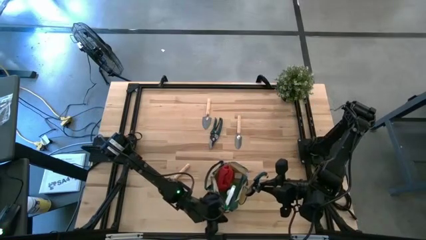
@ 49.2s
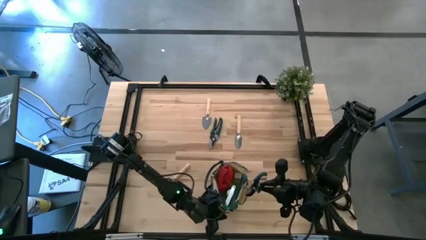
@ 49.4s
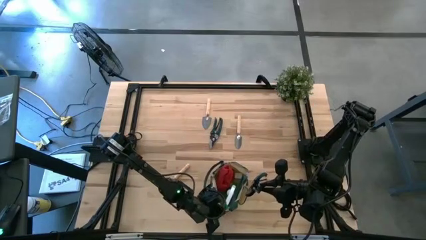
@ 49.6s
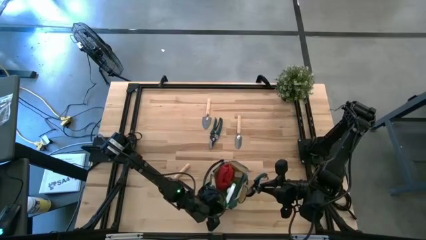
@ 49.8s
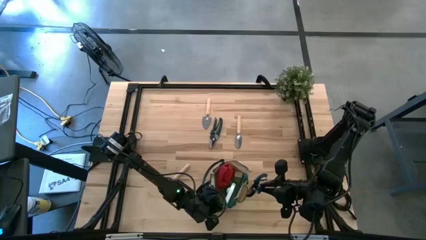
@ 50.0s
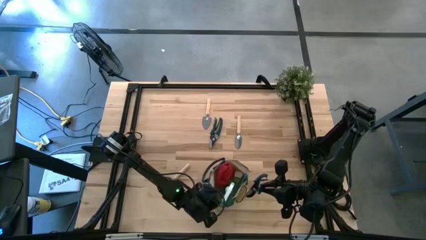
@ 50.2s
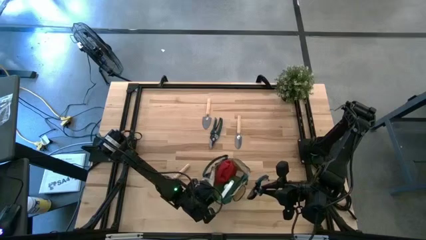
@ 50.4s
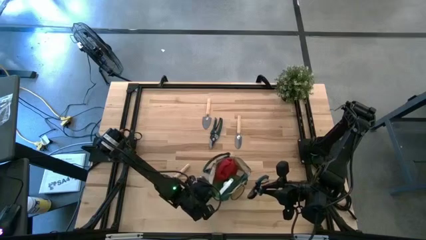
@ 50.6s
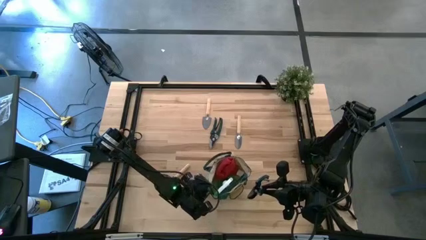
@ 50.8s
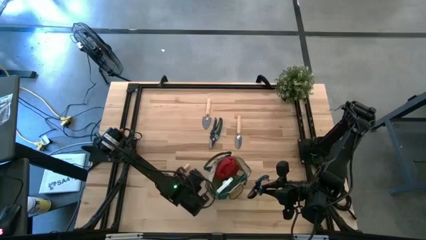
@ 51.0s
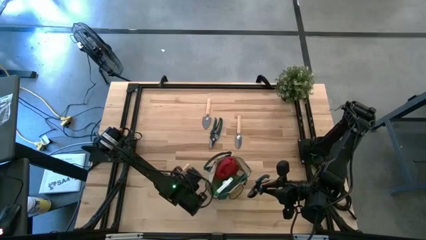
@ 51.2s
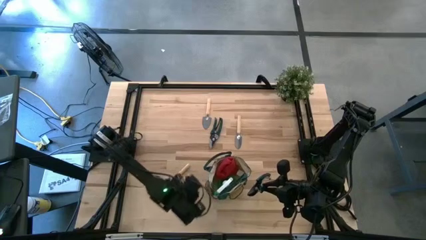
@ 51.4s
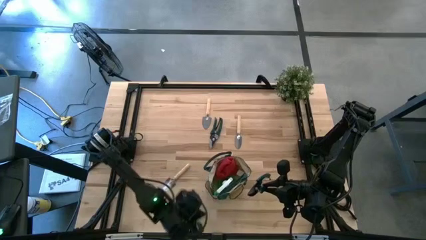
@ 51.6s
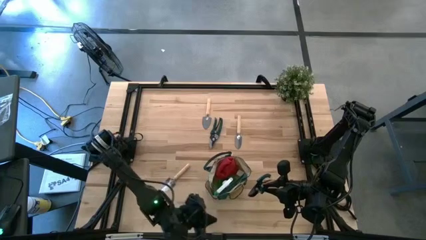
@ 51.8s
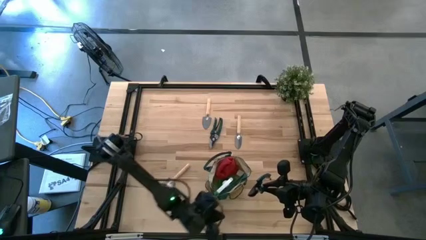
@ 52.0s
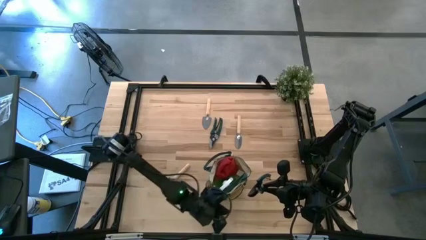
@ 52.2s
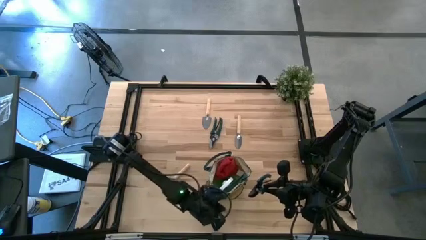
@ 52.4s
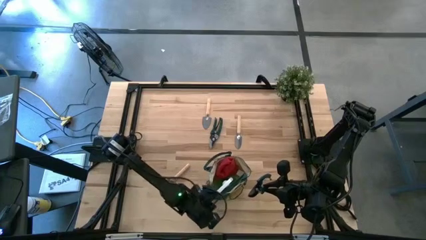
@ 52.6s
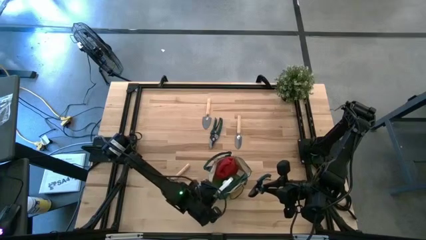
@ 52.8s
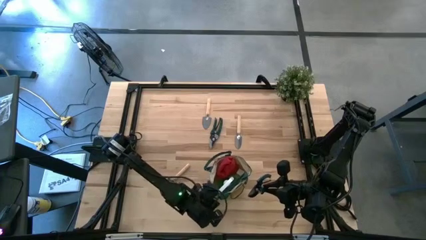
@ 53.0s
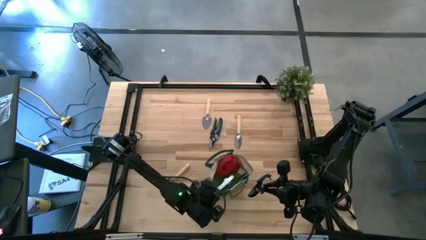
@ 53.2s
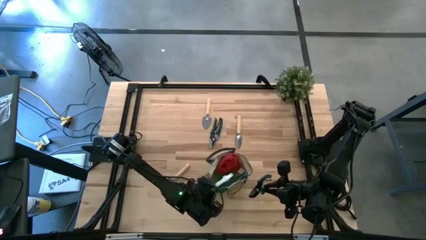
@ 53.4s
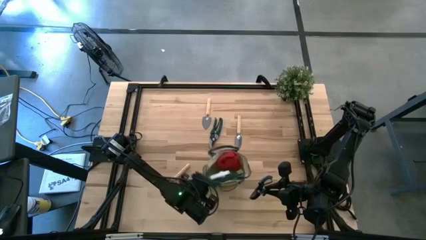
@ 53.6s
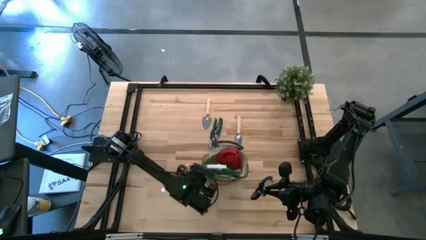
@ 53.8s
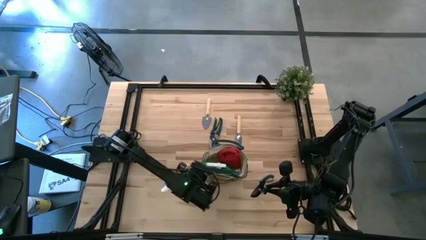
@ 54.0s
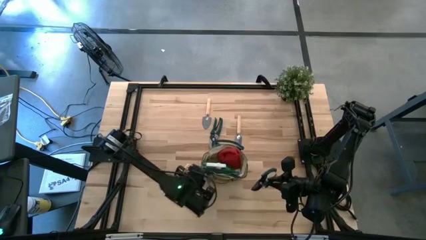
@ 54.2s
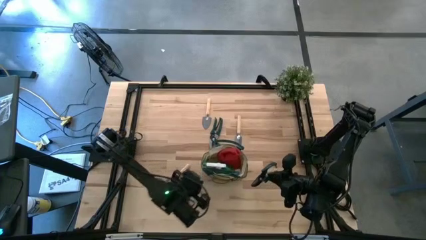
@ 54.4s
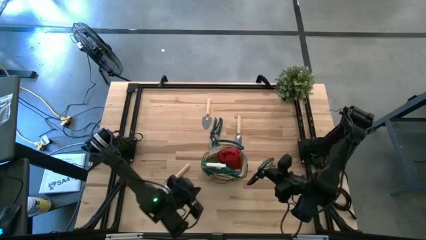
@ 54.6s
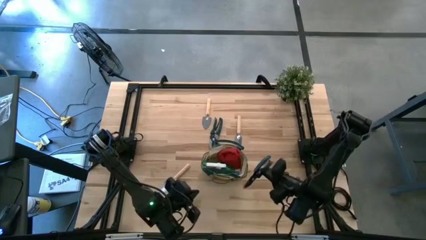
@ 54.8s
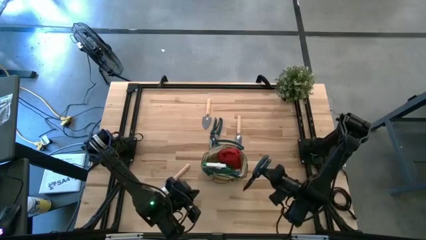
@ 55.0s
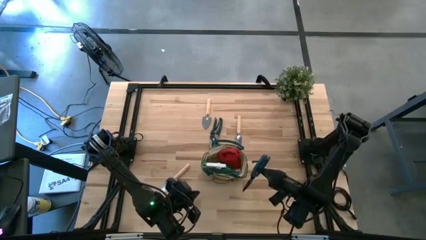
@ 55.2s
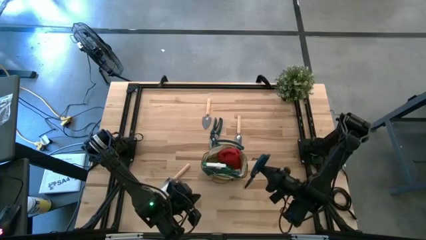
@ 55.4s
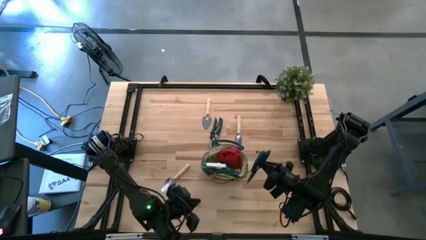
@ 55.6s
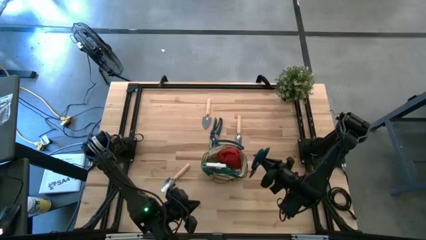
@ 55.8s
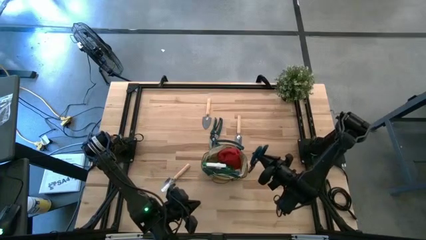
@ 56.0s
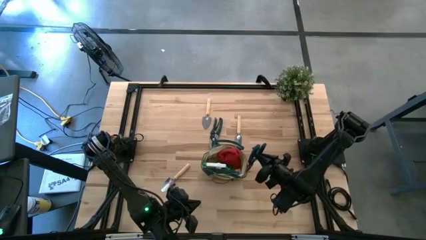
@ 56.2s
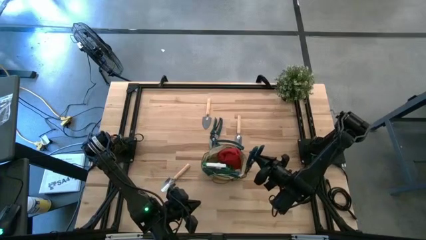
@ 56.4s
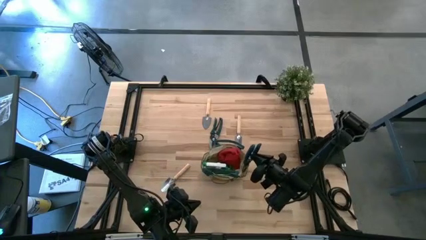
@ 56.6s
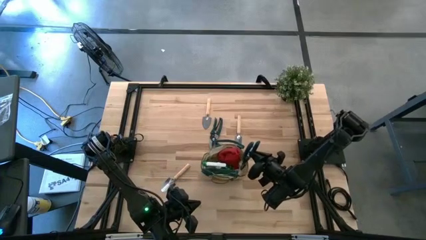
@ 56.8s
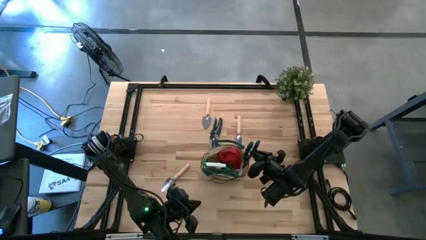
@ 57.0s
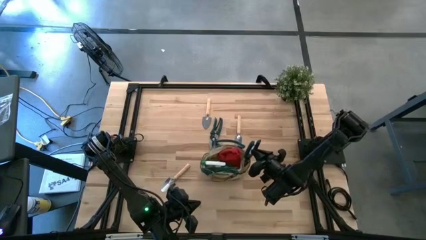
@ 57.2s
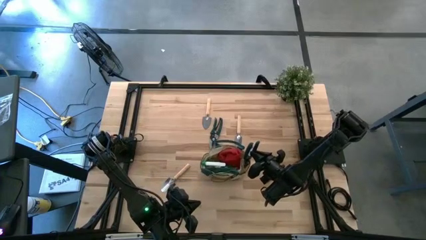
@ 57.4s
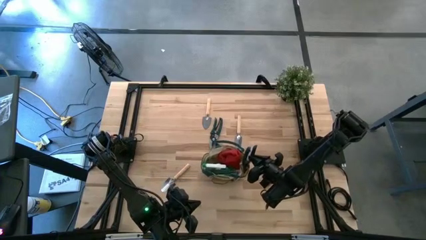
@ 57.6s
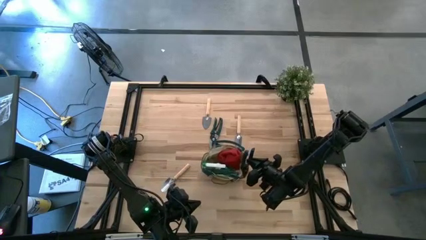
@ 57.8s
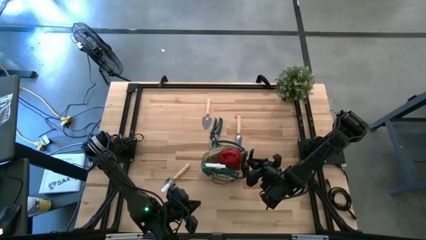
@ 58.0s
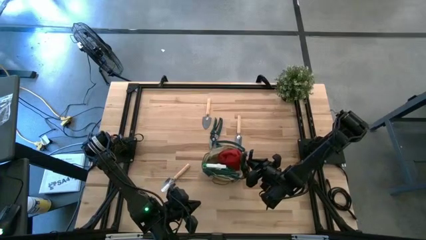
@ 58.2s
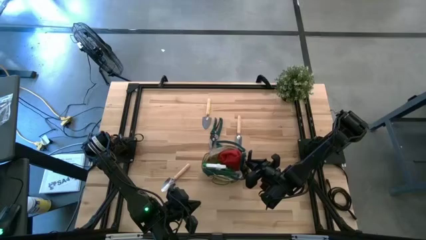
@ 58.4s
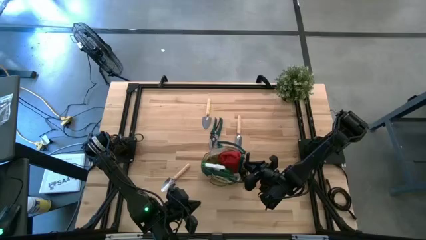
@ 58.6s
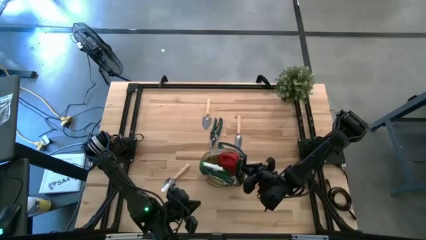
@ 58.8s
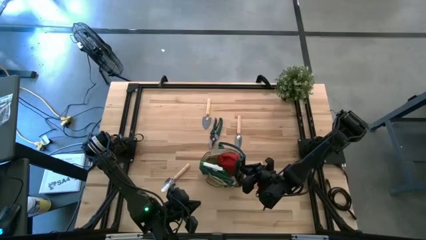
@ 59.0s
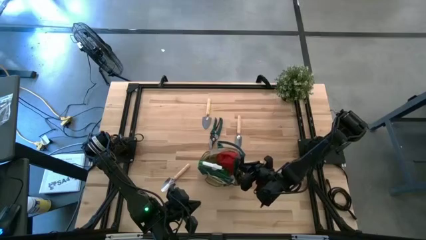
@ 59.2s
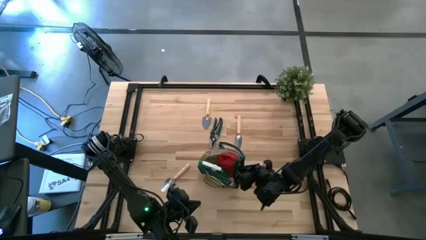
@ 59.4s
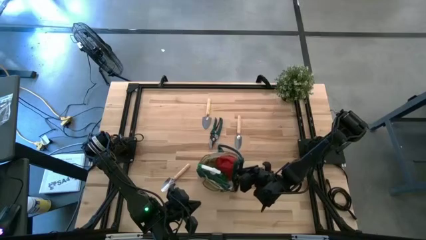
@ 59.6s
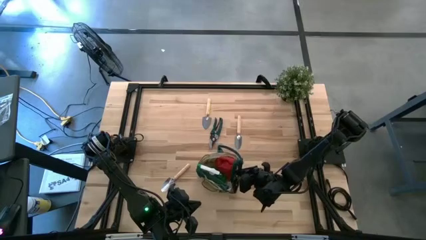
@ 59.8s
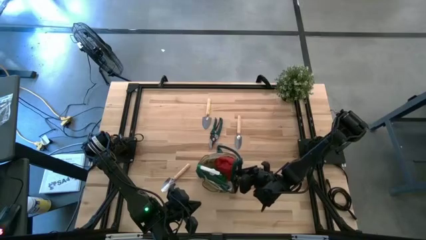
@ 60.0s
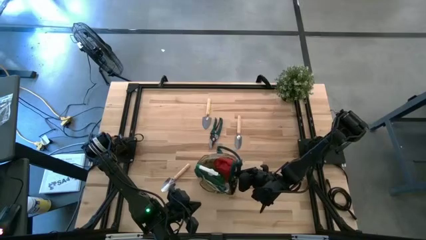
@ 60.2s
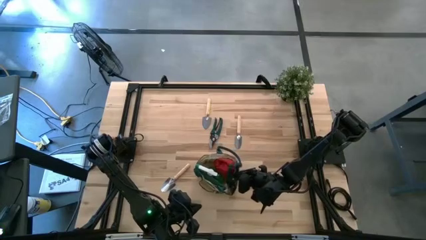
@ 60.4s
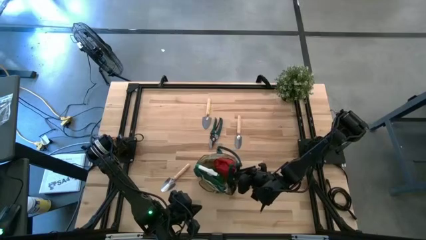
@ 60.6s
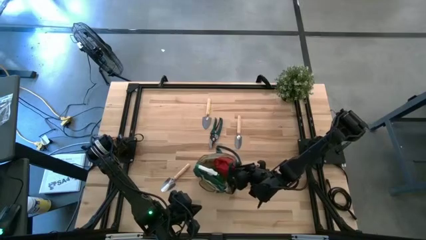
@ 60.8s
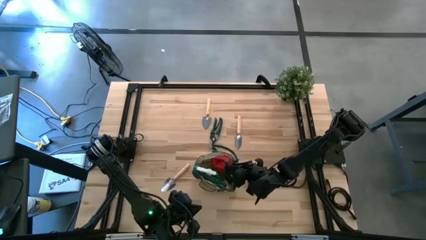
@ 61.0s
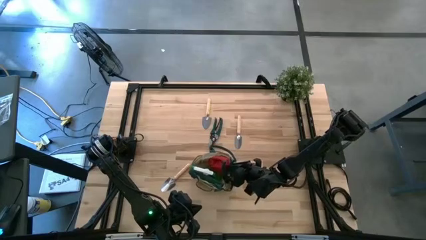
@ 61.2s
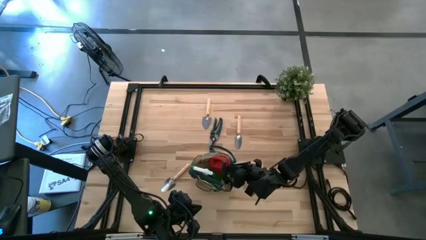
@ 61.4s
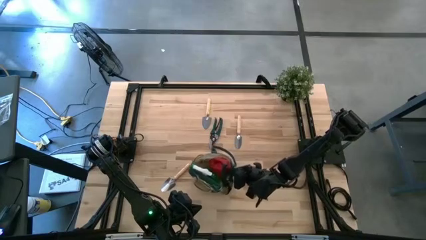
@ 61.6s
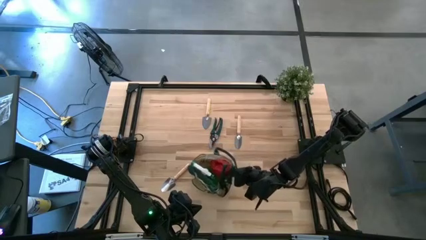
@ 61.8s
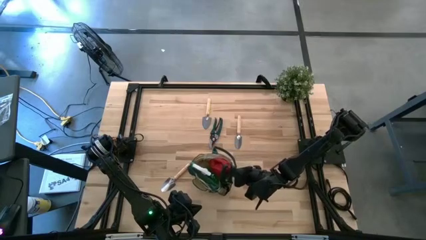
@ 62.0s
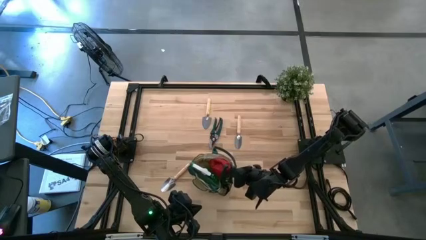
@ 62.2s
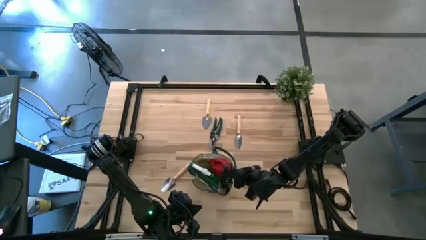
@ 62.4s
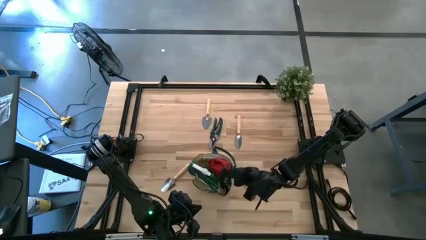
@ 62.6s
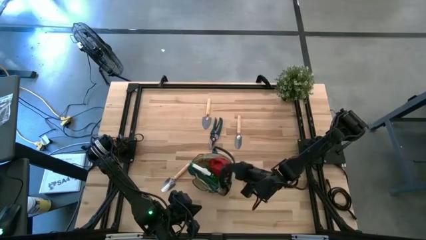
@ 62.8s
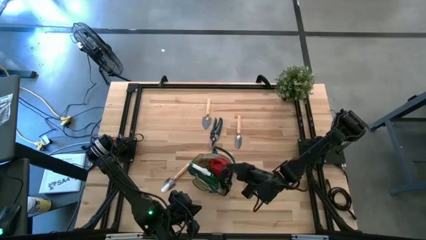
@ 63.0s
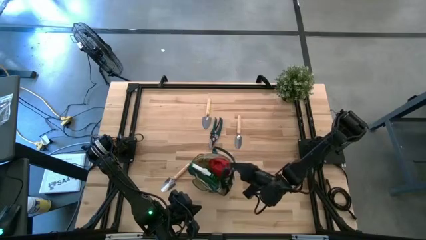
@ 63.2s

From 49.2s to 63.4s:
Task: Pick & Place Garden tools in Gardening bag
Put the top shear scissors into the gardening bag
